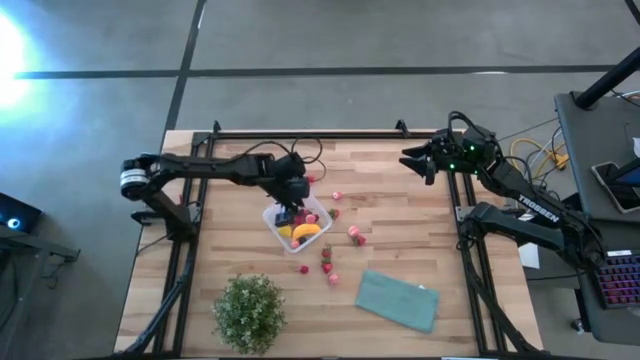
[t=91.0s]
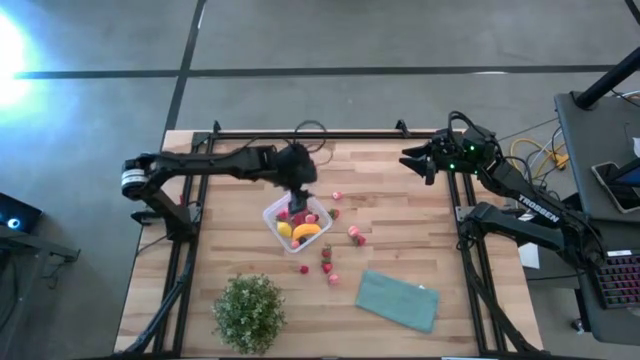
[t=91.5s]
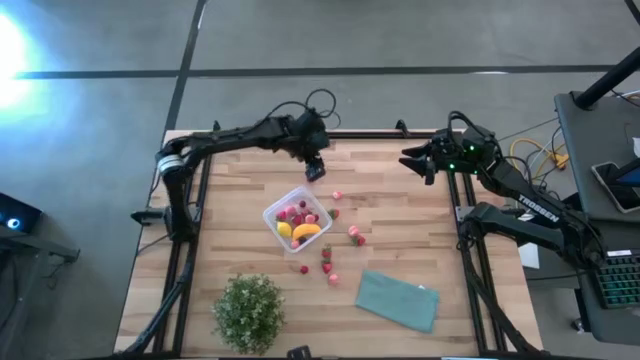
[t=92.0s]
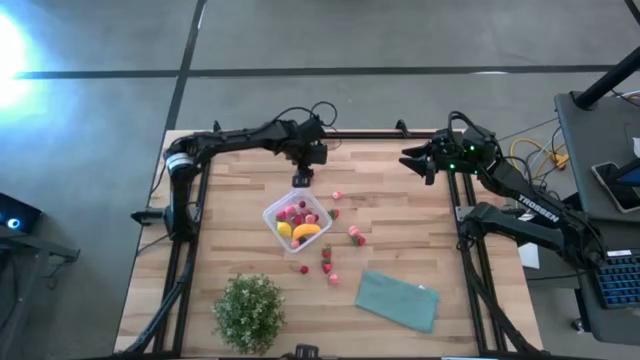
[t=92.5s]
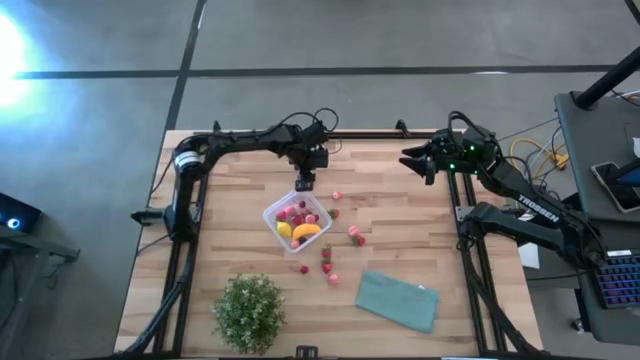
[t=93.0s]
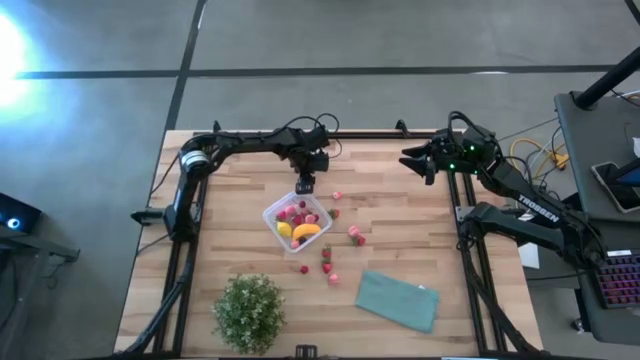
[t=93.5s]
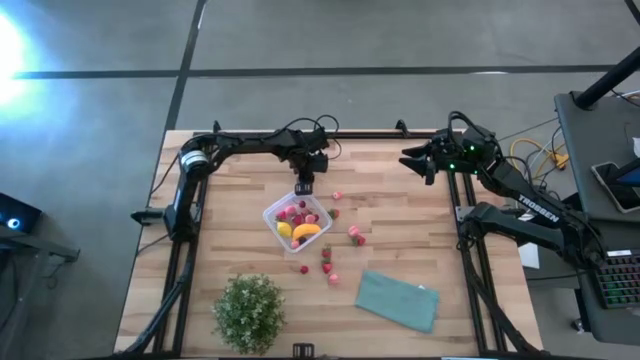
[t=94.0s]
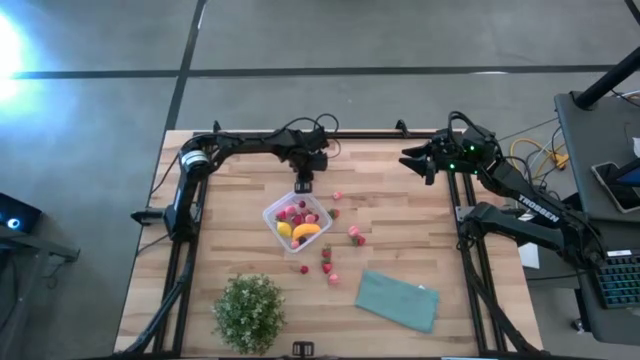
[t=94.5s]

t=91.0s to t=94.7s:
Task: Pick and placing Produce into tupperware
Put the top red cherry into the transparent bin

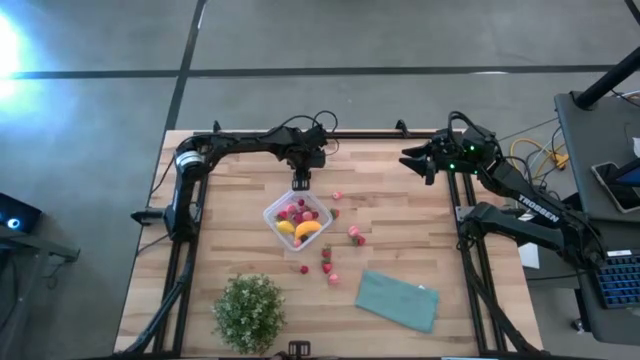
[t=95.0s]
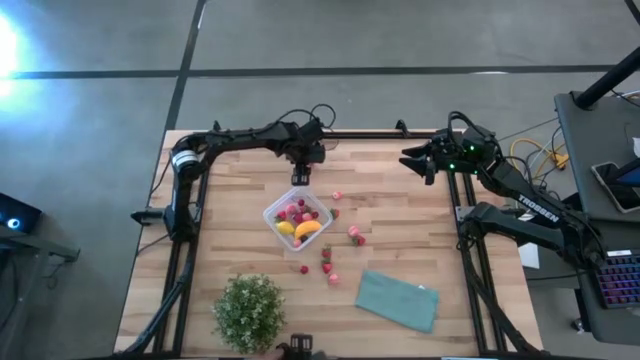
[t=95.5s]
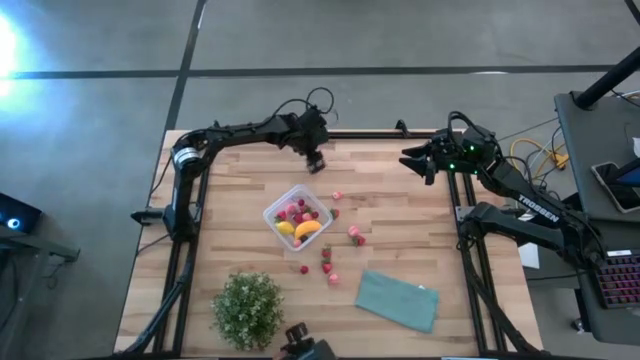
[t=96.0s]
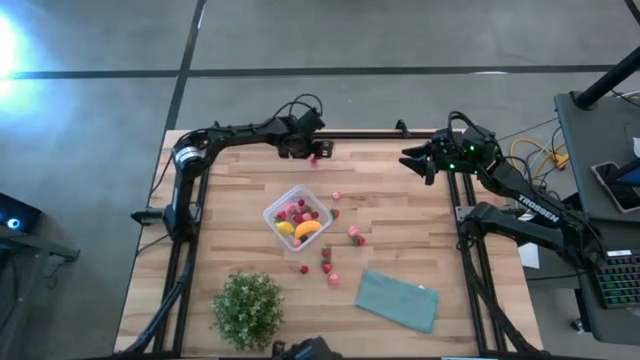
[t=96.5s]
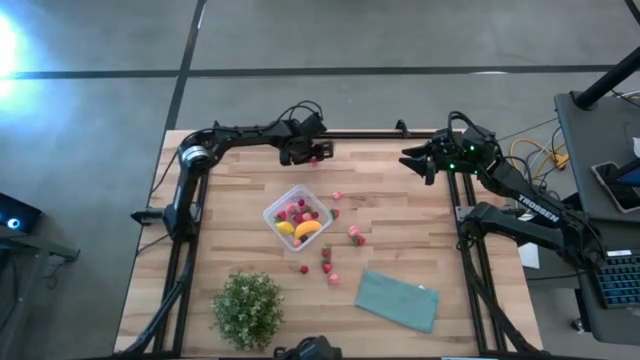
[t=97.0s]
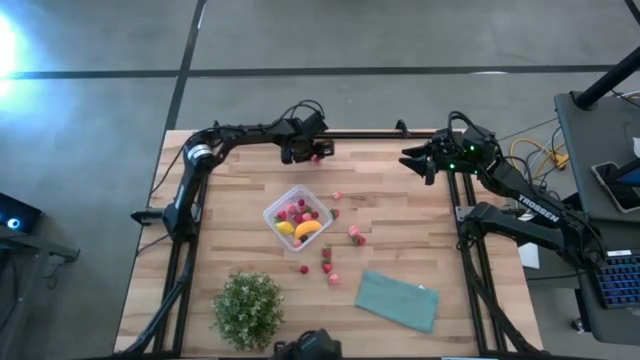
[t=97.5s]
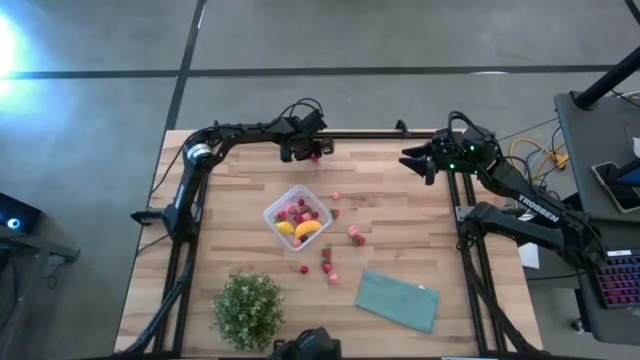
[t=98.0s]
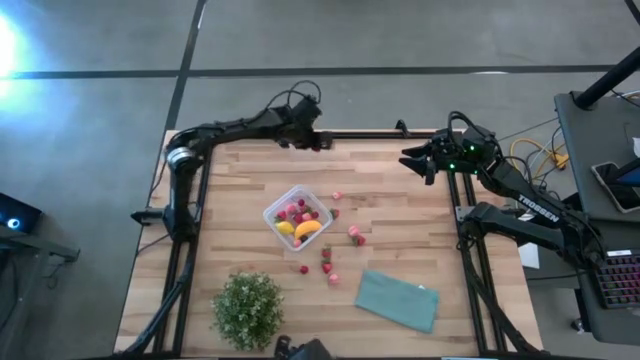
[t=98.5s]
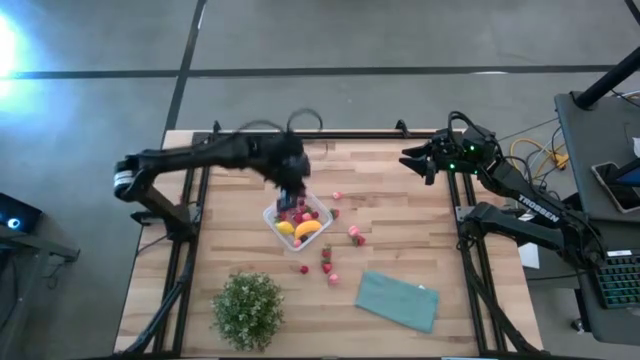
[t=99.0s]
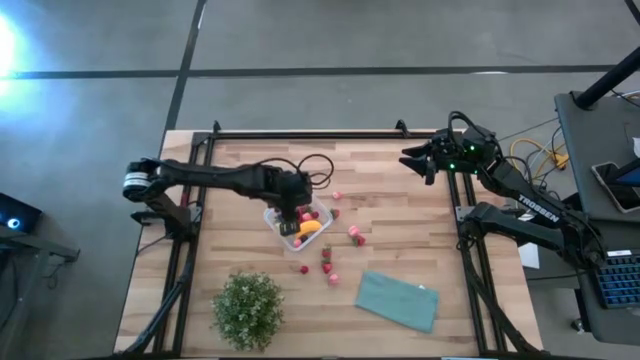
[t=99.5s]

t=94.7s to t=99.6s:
Put the top red cherry into the transparent bin

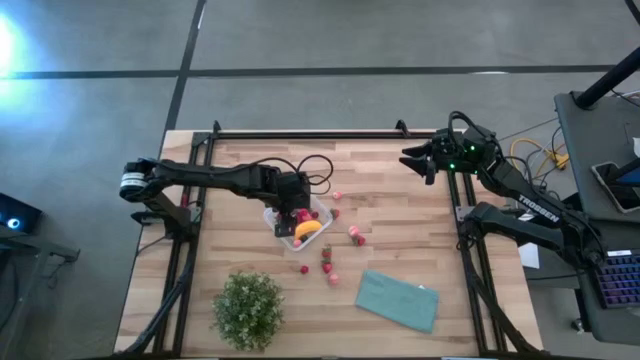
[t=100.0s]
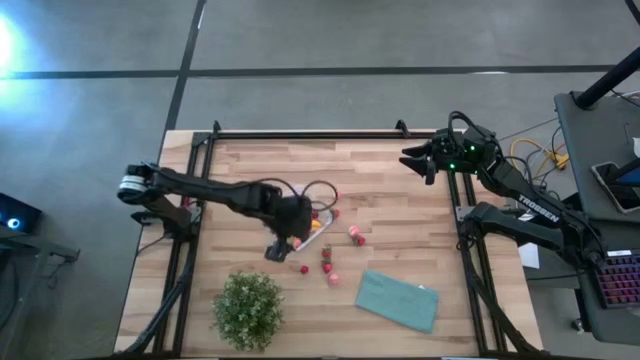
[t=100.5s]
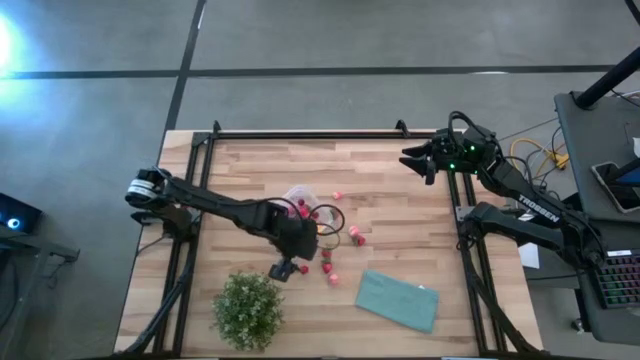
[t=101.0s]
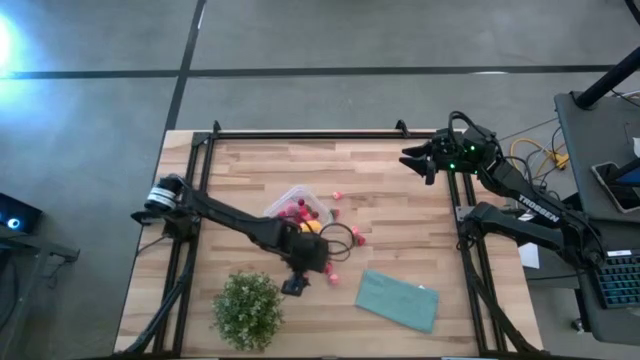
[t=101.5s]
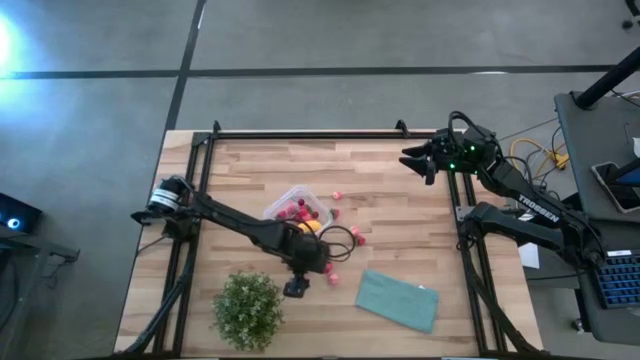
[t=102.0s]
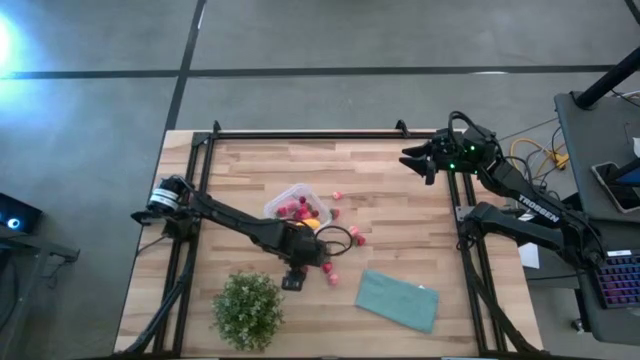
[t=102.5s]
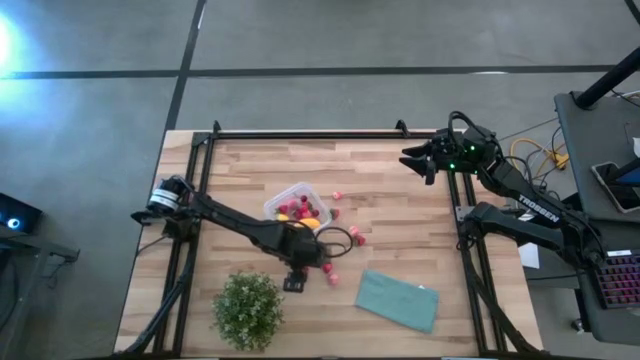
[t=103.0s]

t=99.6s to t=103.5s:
Put the red cherry into the transparent bin

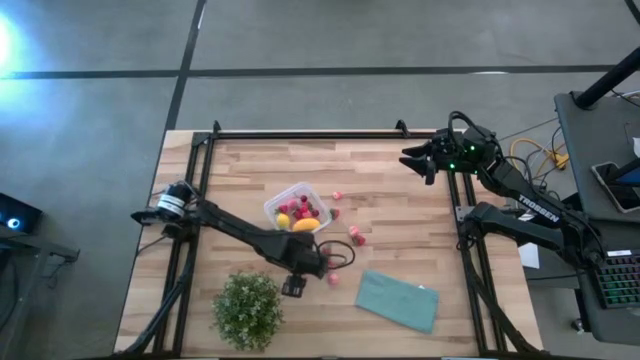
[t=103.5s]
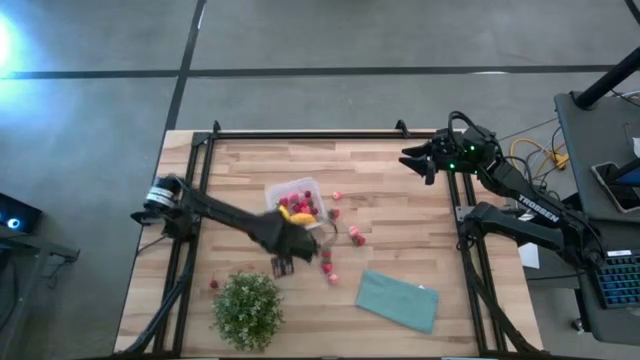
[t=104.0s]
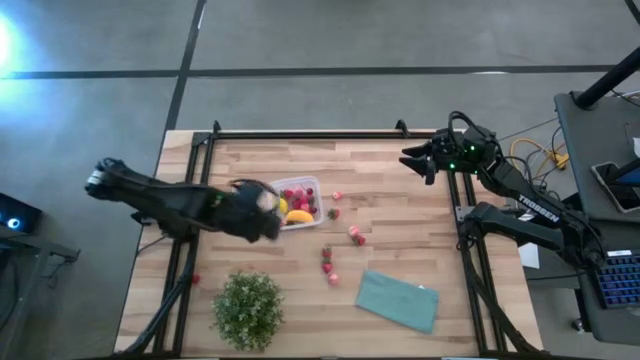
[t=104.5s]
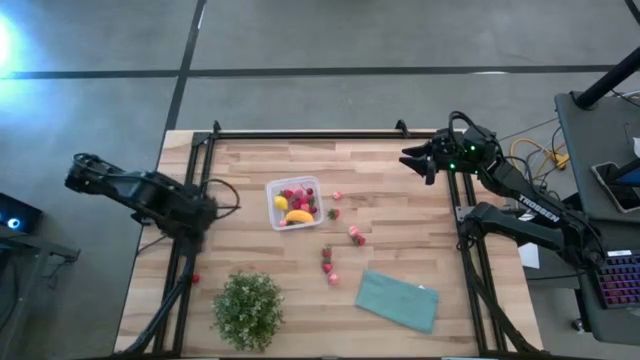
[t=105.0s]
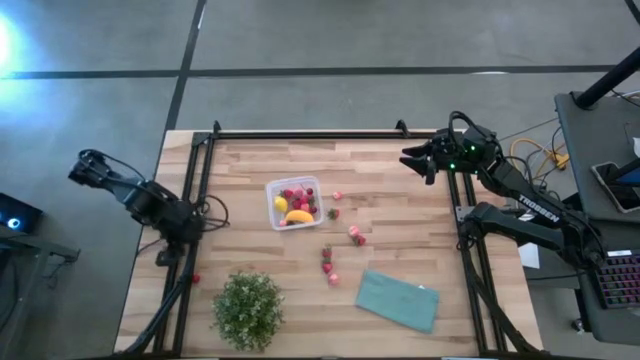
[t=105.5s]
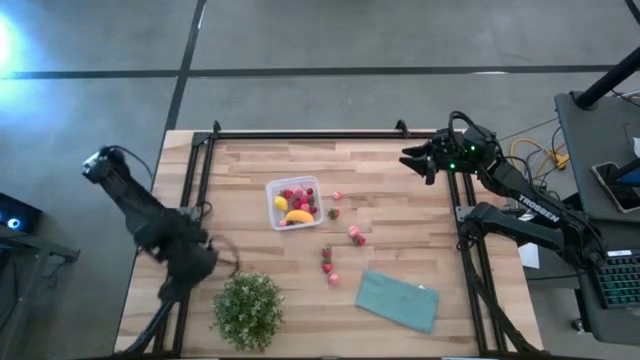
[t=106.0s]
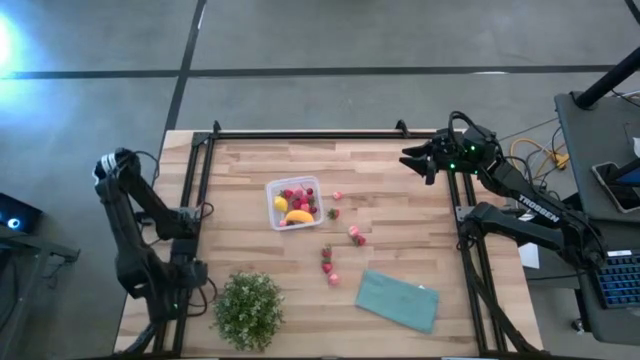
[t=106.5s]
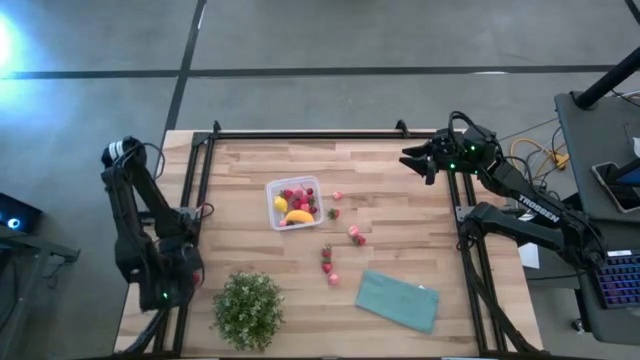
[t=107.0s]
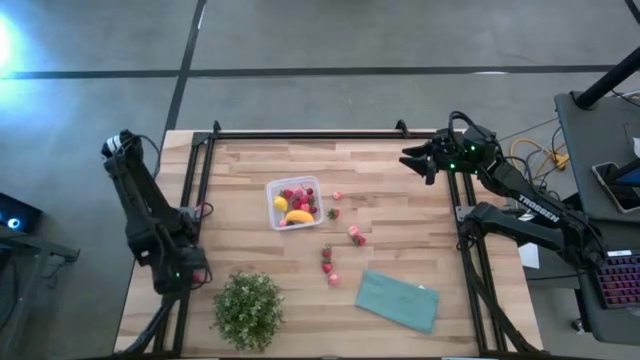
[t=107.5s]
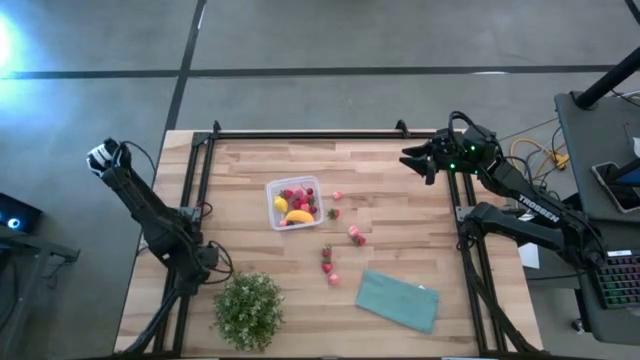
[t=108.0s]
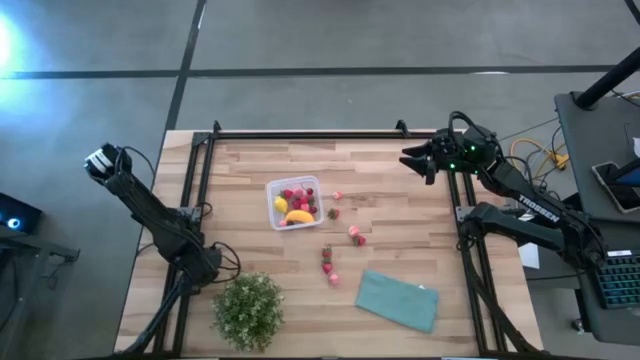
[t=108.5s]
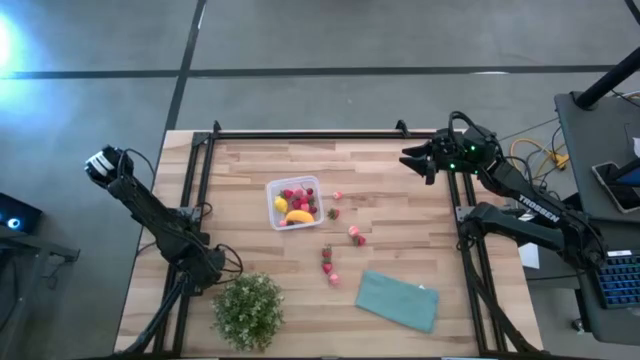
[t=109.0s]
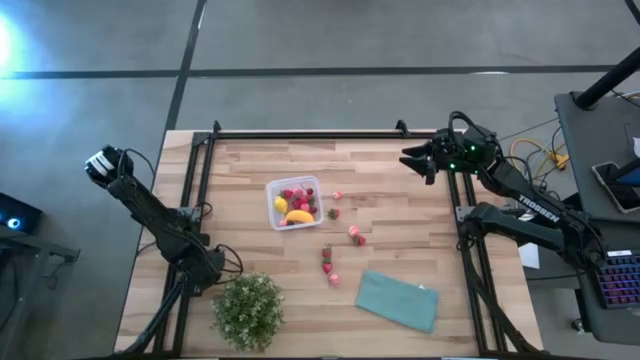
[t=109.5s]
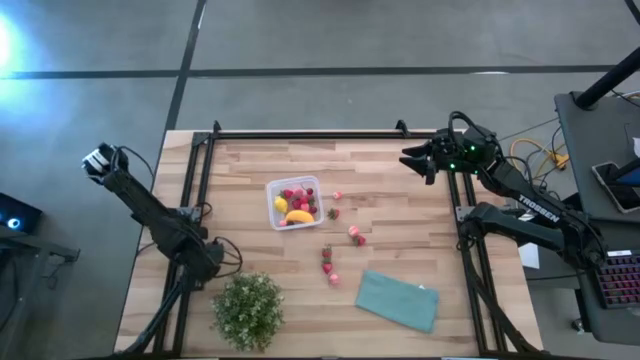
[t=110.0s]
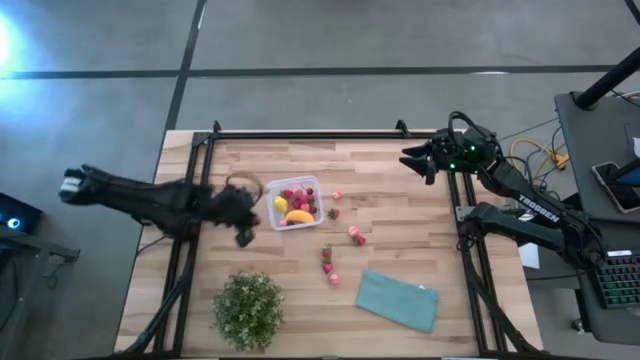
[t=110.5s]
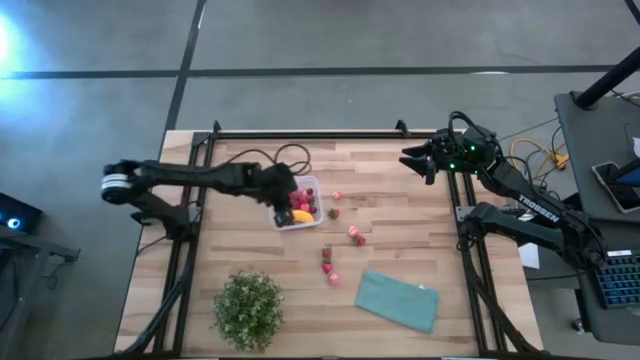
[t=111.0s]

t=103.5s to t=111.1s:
Put the red cherry into the transparent bin
